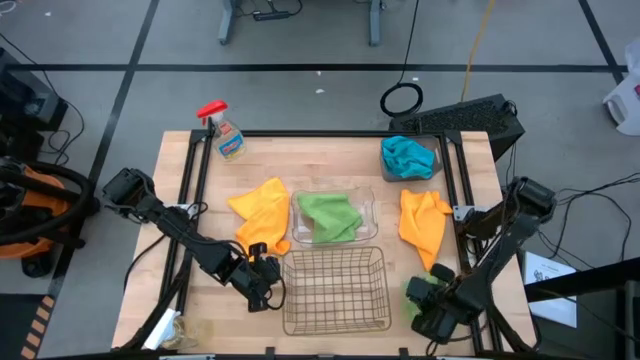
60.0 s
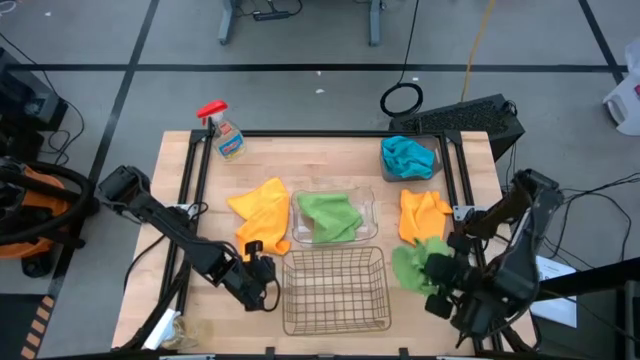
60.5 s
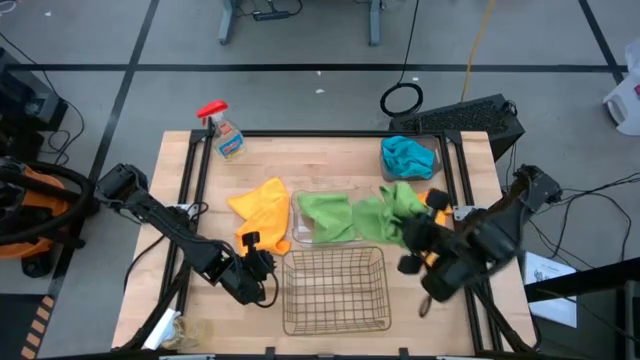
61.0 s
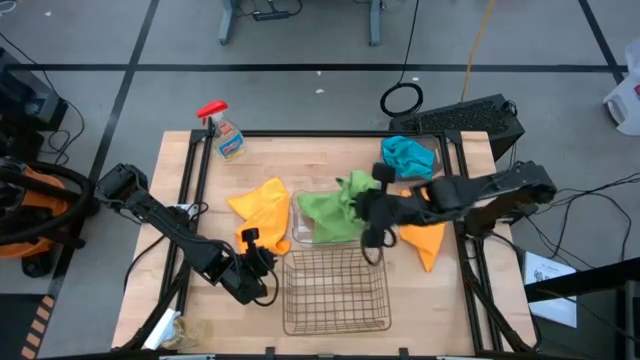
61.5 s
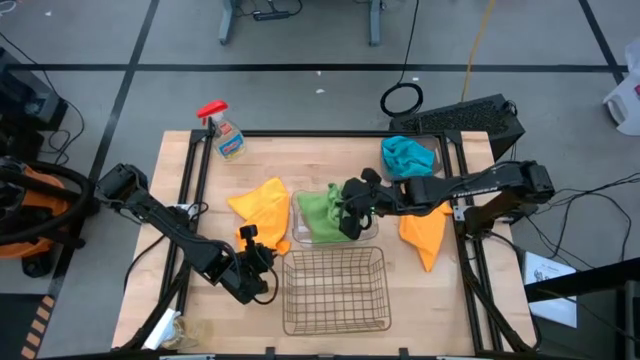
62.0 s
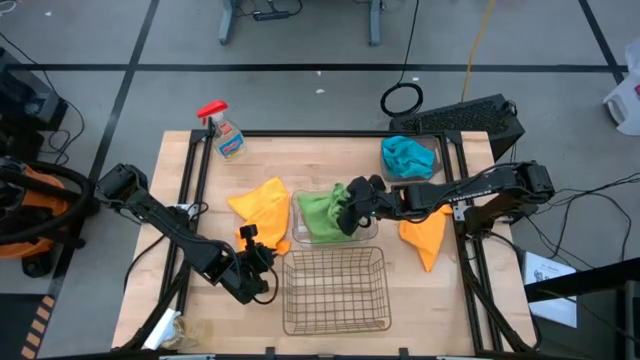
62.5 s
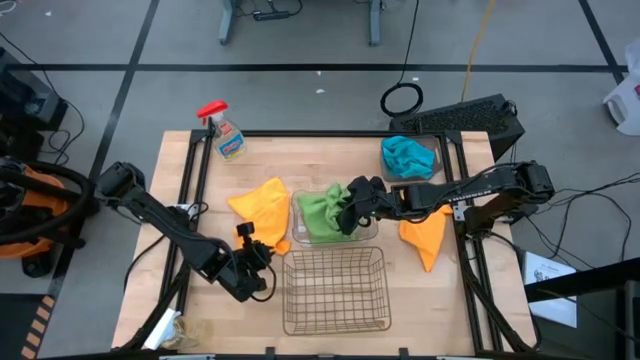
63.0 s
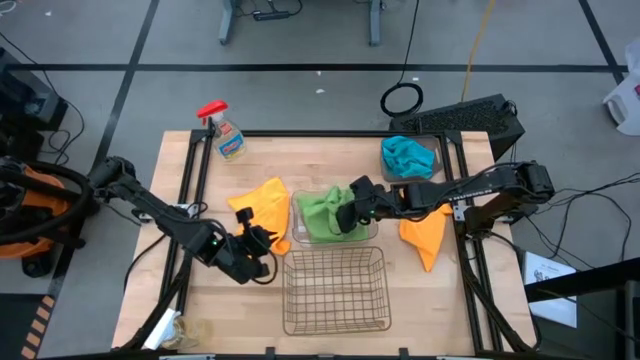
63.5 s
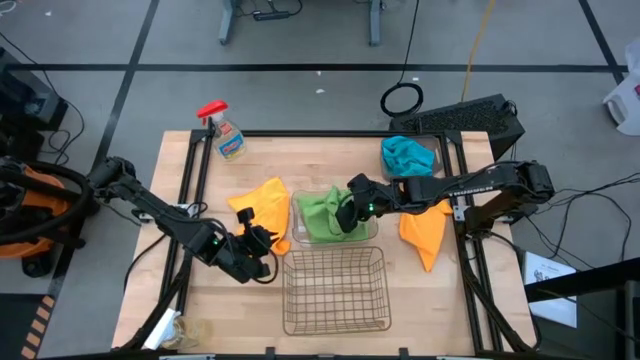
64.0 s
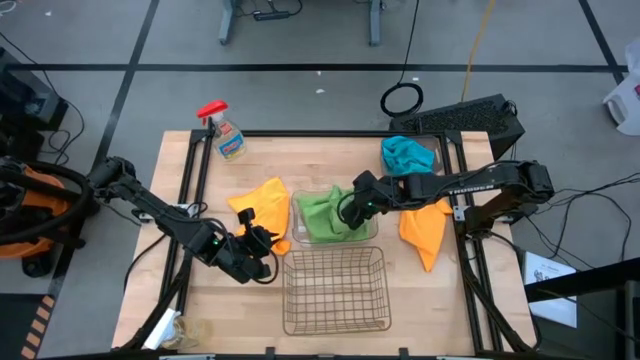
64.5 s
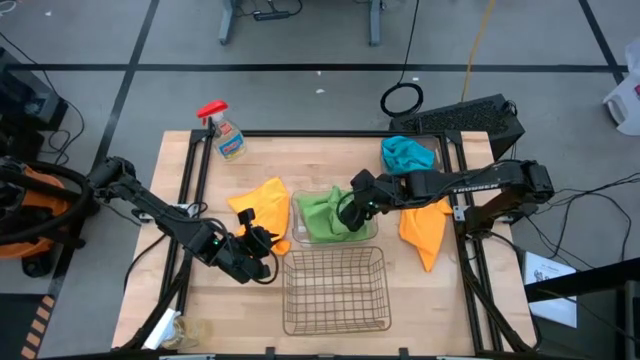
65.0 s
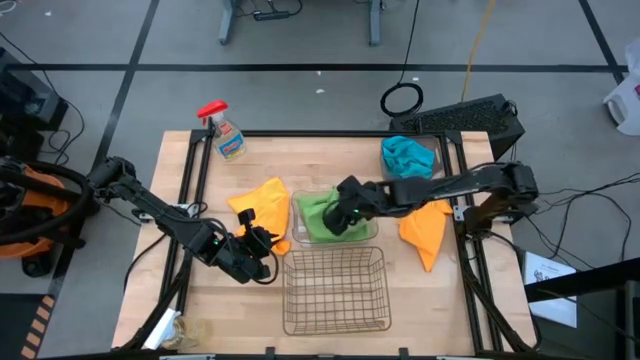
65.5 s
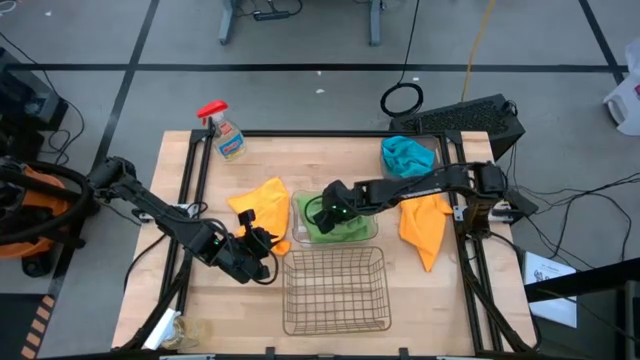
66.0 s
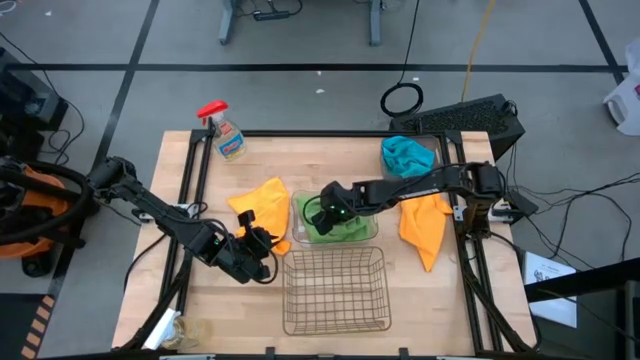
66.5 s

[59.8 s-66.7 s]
Task: Sort microfiber towel by color & place in baskets
Put the green microfiber cloth into the transparent bin

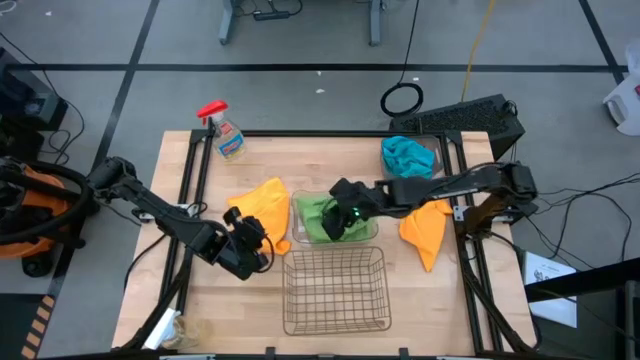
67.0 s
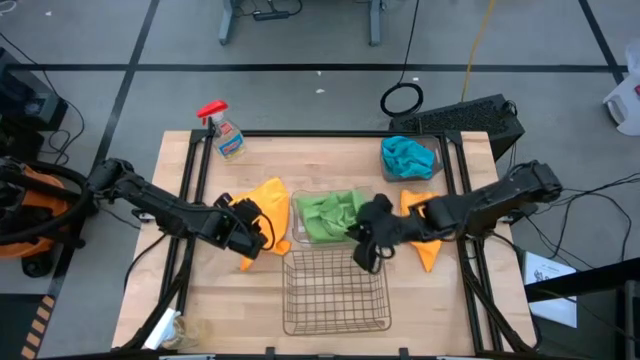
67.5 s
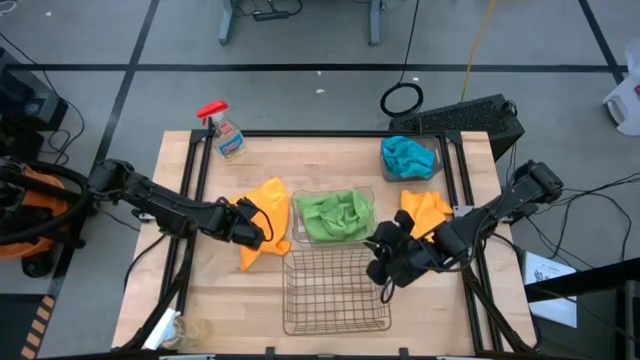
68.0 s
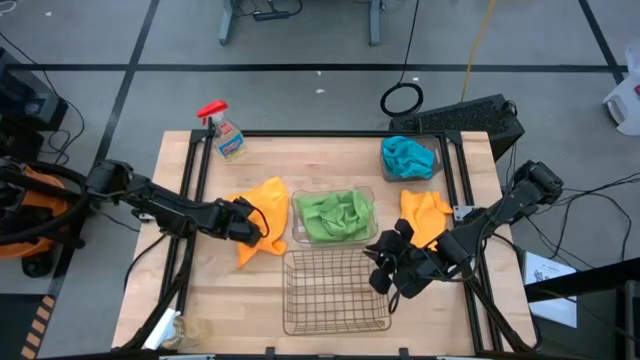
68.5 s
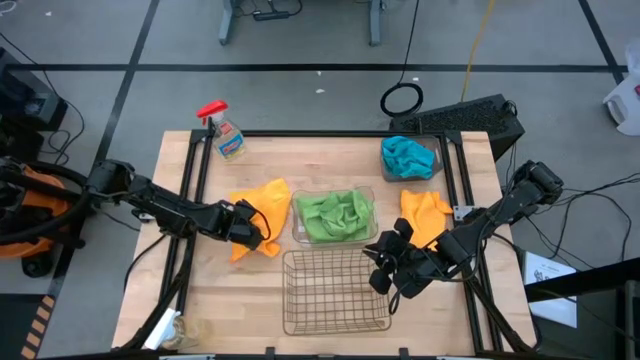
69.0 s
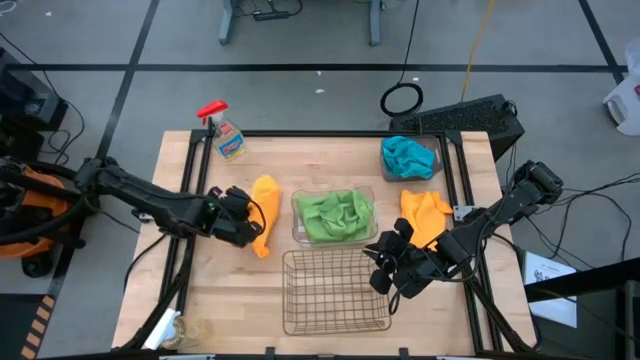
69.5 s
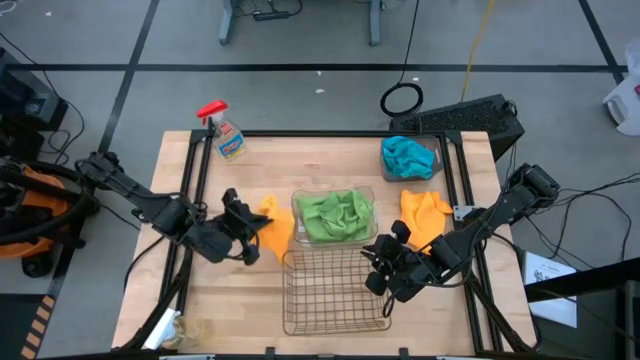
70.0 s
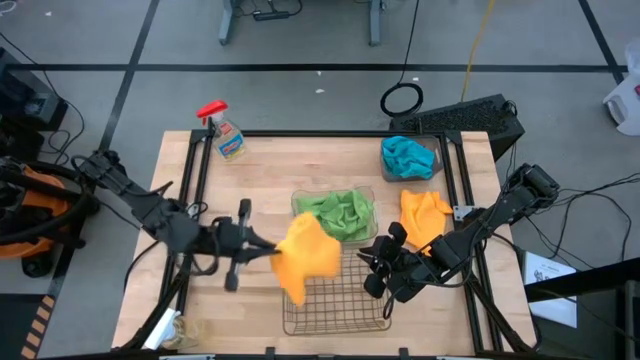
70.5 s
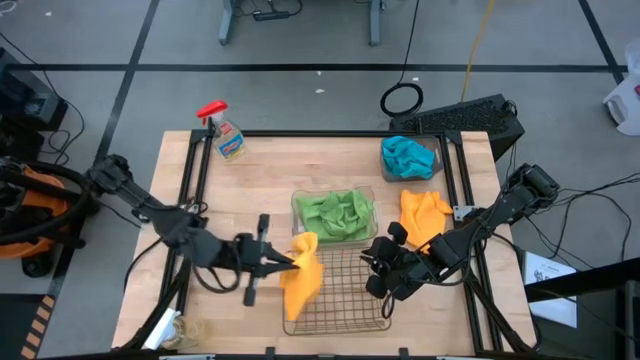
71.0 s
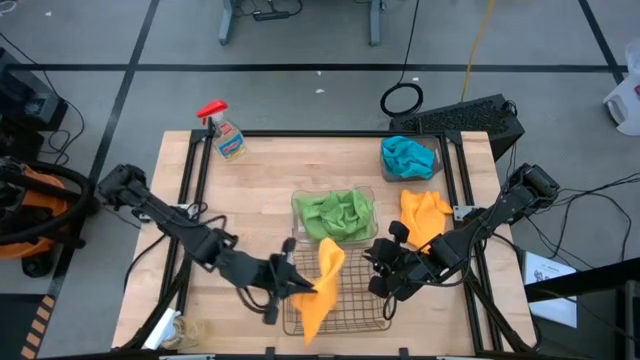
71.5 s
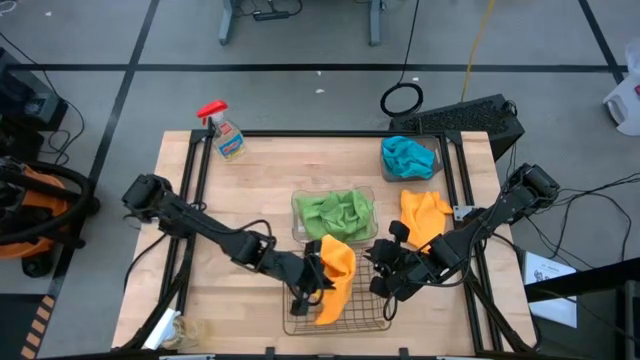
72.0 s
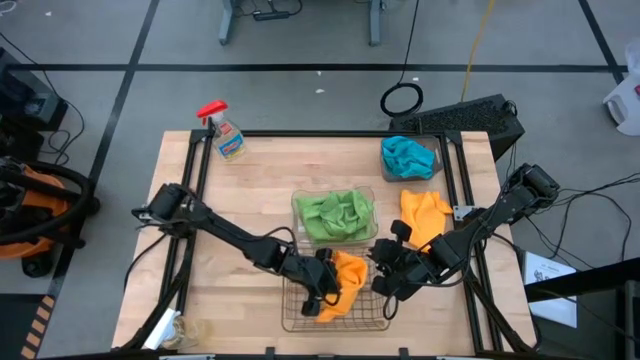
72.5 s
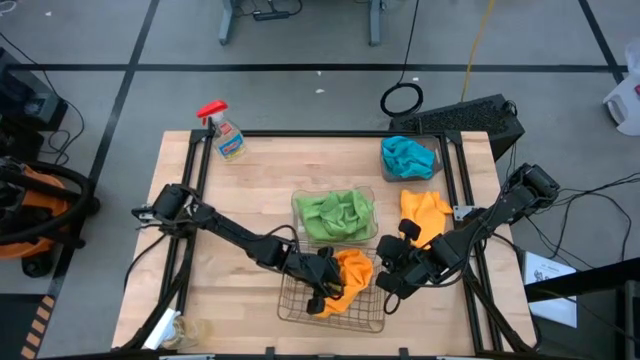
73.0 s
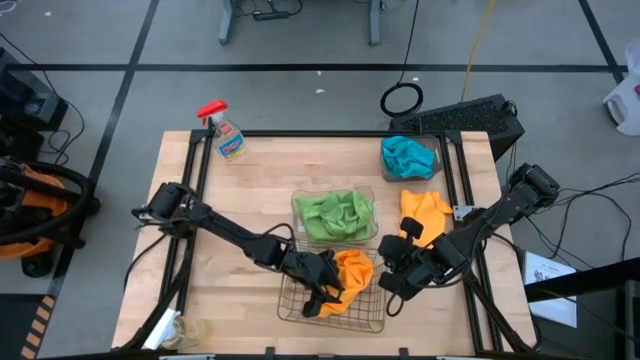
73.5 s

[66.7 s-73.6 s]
Put the left yellow microfiber cloth into the golden wire basket

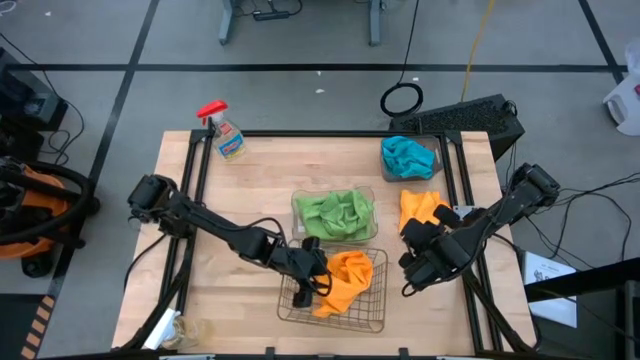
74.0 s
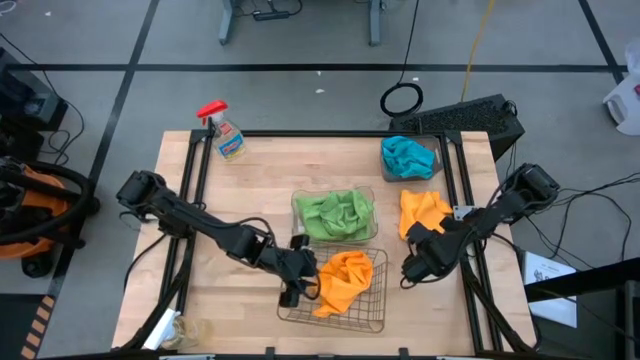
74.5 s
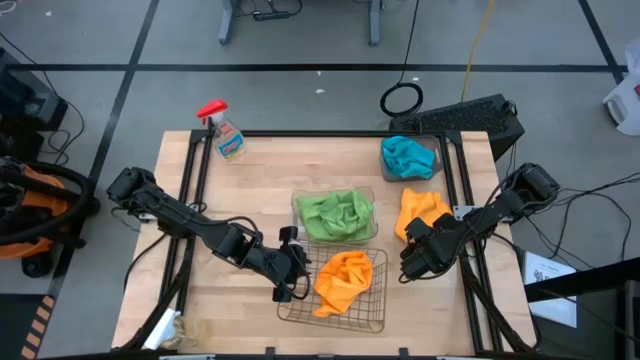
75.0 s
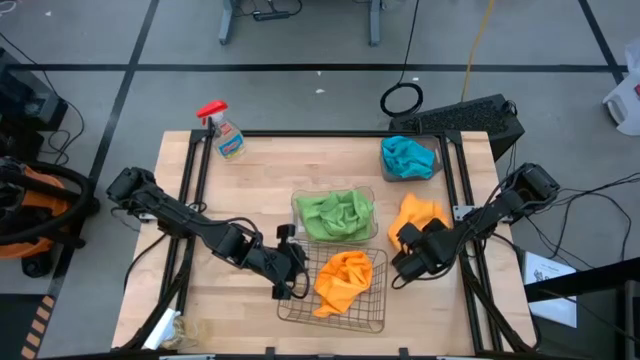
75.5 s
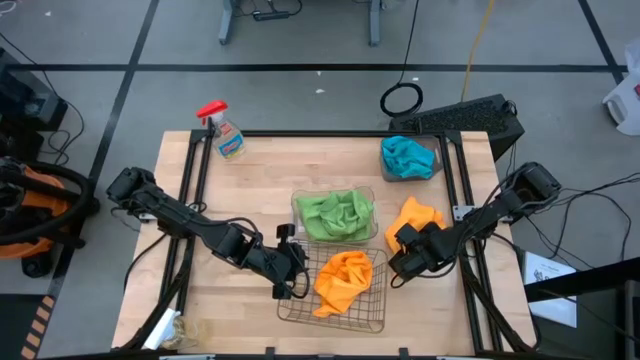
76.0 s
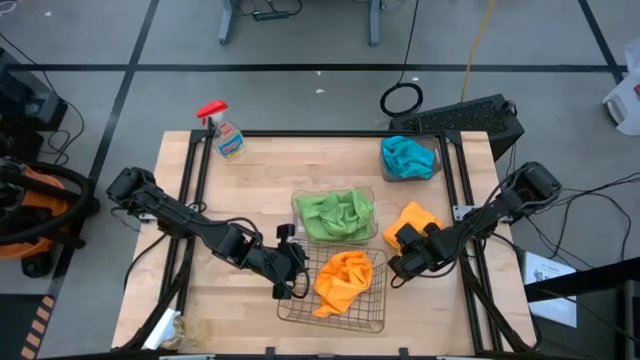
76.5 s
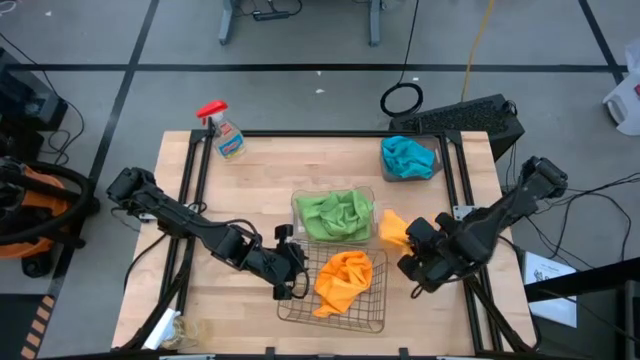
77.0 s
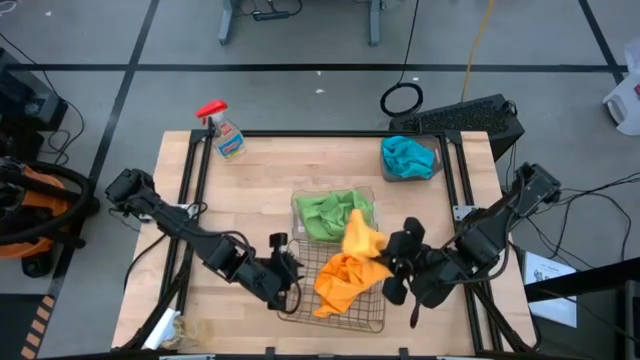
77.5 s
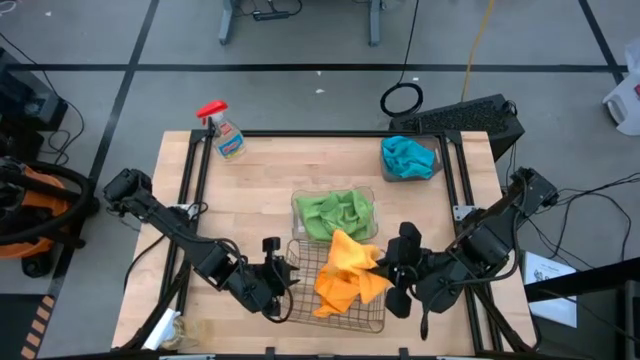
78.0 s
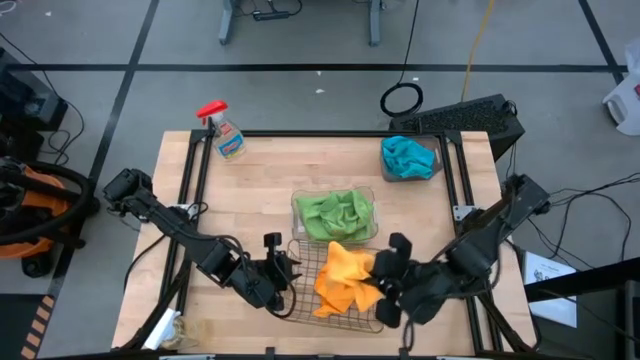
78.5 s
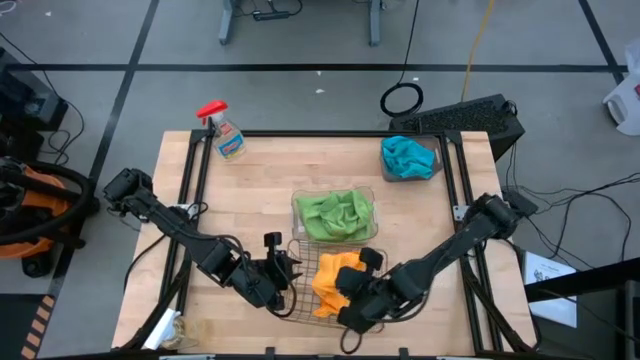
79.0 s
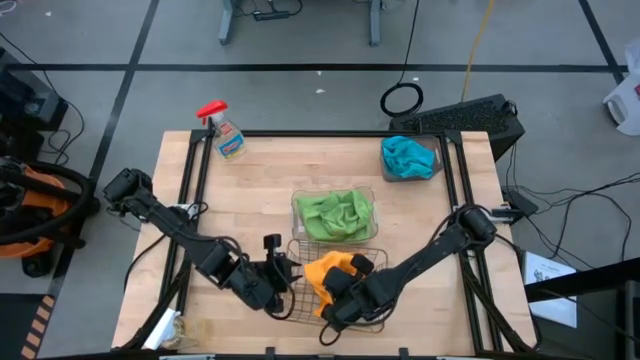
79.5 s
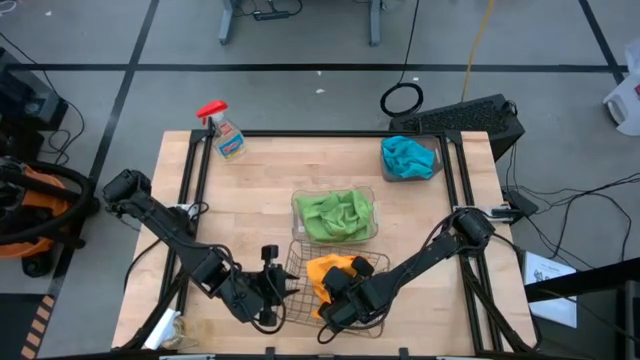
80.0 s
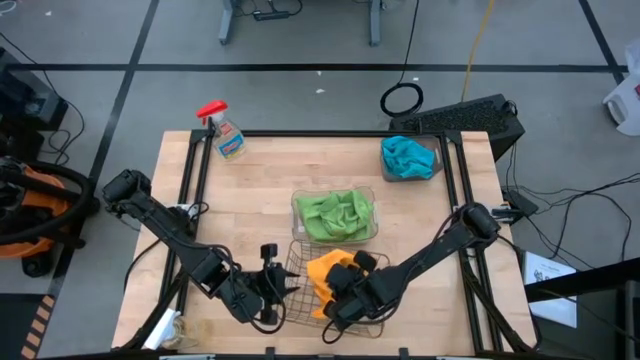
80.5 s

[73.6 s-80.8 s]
Put the yellow microfiber cloth into the golden wire basket
